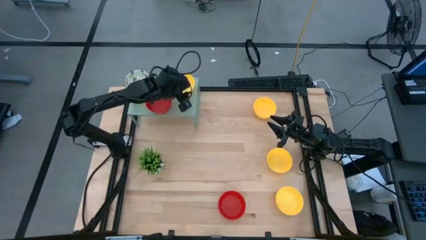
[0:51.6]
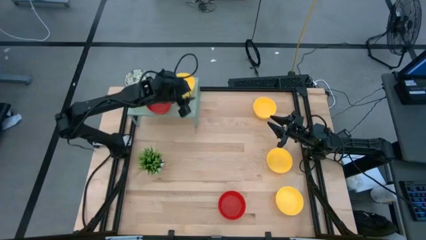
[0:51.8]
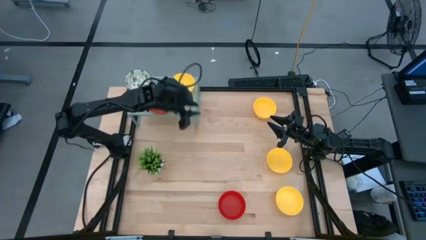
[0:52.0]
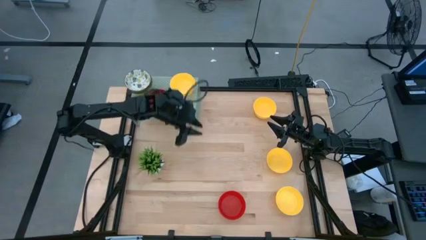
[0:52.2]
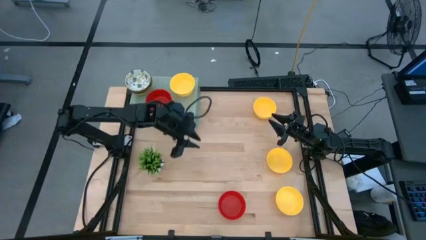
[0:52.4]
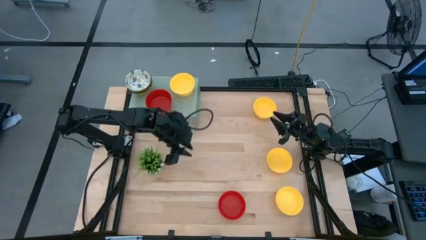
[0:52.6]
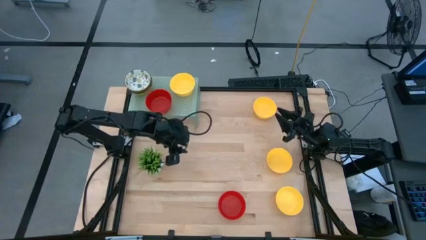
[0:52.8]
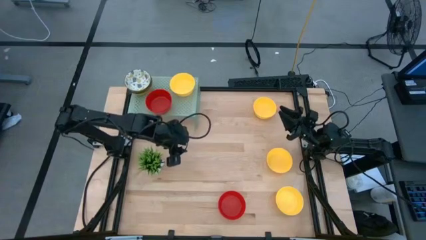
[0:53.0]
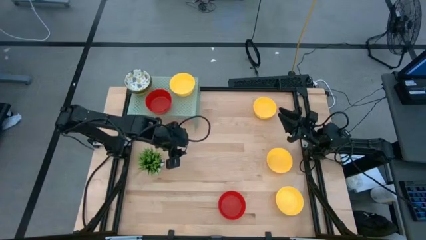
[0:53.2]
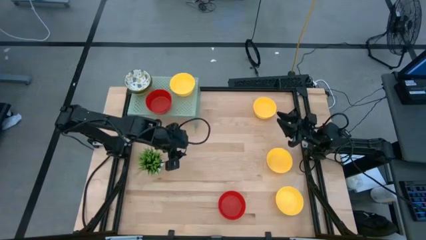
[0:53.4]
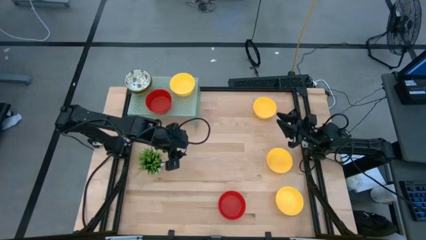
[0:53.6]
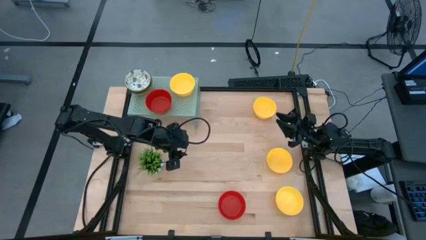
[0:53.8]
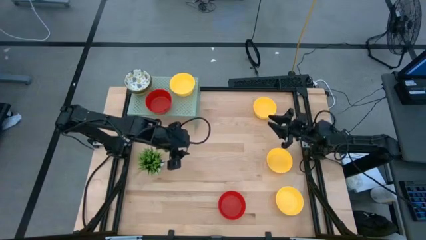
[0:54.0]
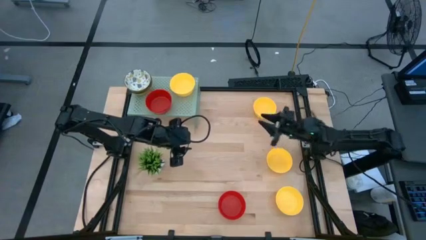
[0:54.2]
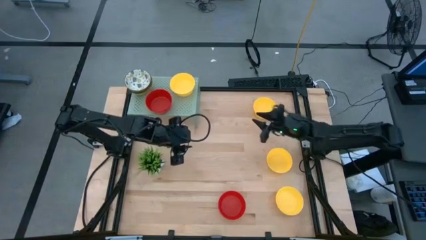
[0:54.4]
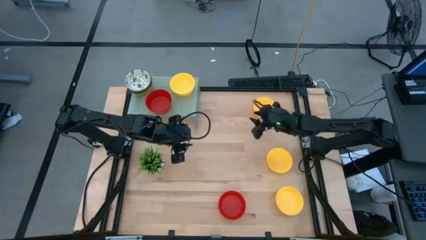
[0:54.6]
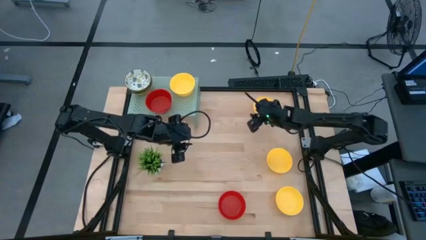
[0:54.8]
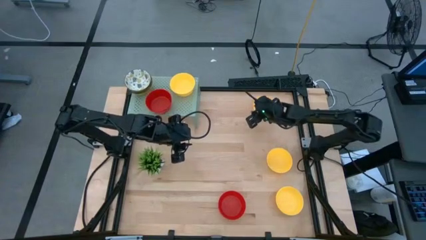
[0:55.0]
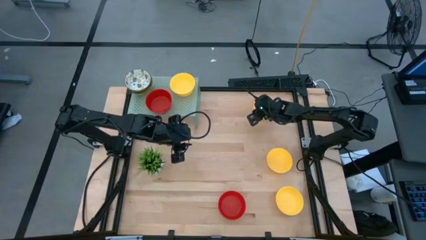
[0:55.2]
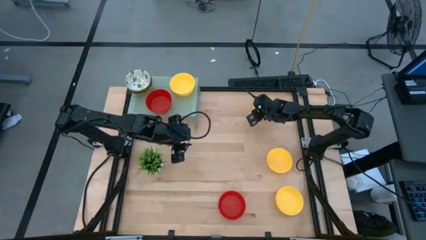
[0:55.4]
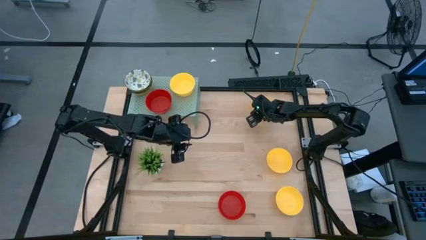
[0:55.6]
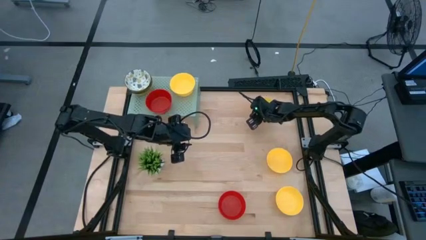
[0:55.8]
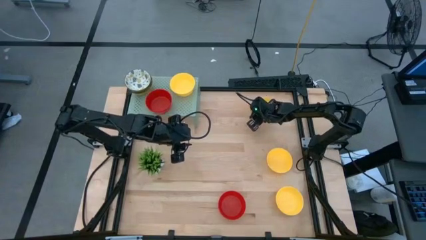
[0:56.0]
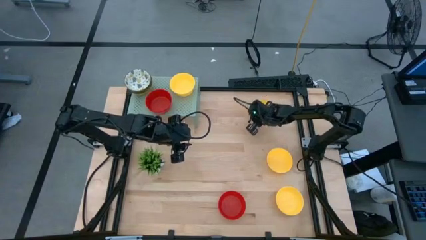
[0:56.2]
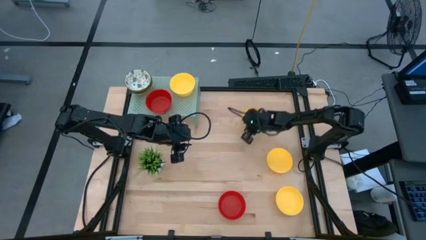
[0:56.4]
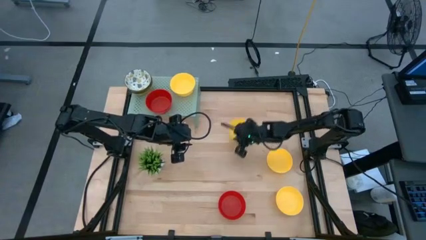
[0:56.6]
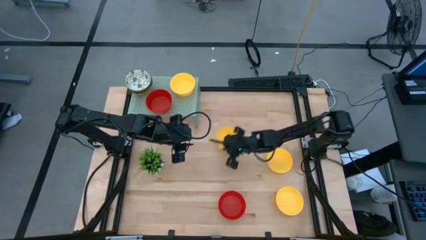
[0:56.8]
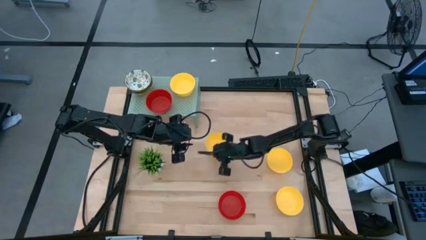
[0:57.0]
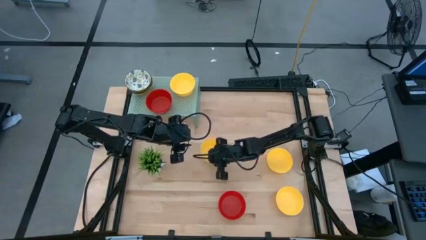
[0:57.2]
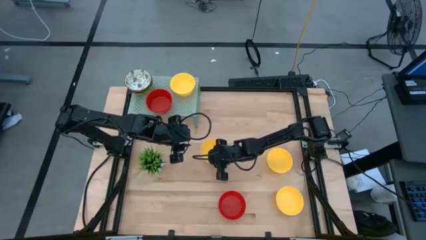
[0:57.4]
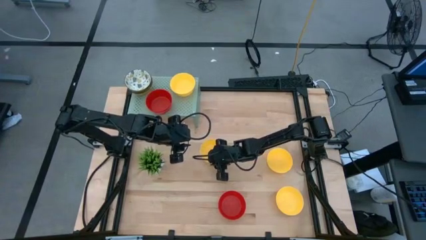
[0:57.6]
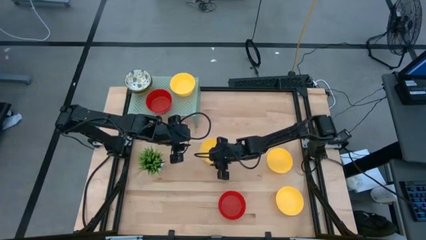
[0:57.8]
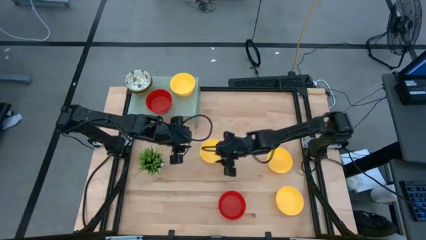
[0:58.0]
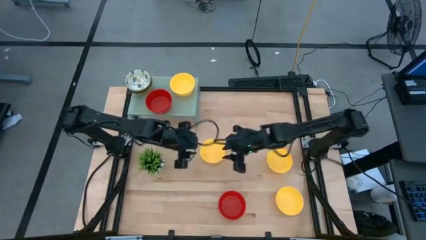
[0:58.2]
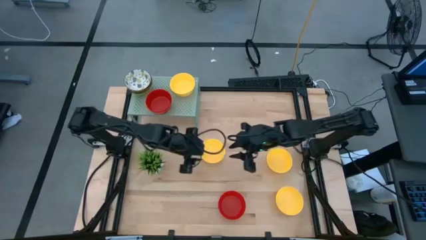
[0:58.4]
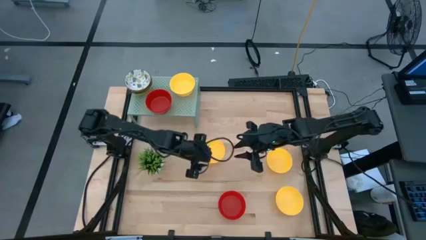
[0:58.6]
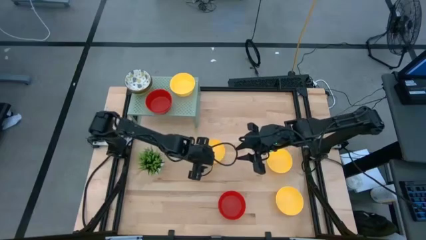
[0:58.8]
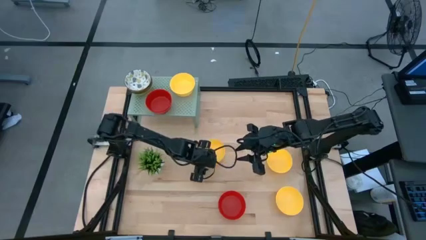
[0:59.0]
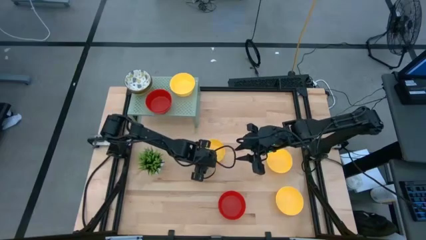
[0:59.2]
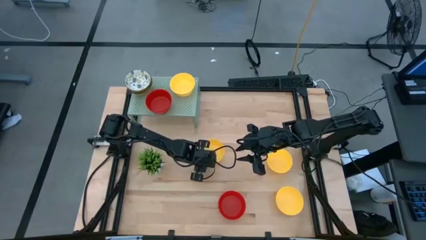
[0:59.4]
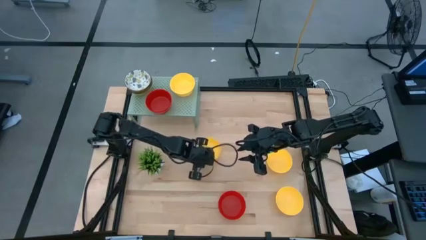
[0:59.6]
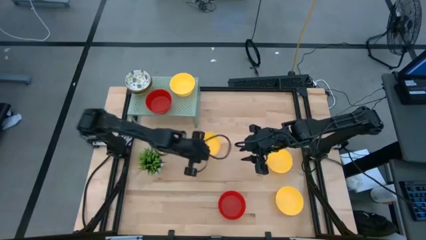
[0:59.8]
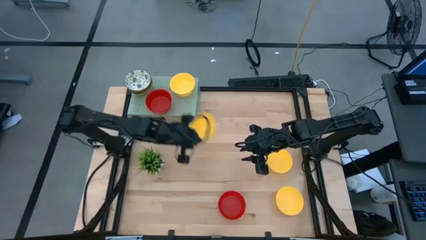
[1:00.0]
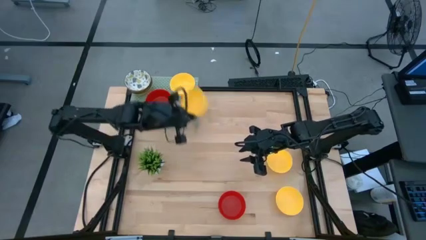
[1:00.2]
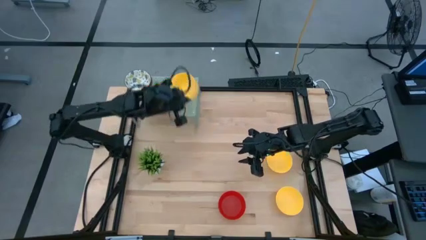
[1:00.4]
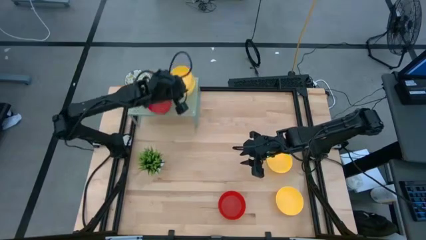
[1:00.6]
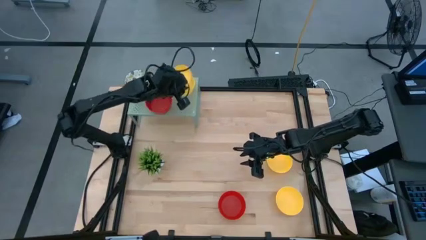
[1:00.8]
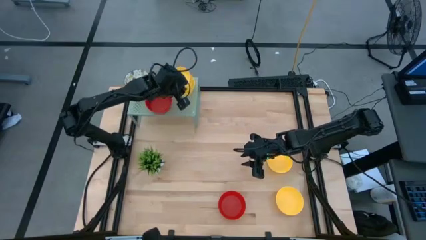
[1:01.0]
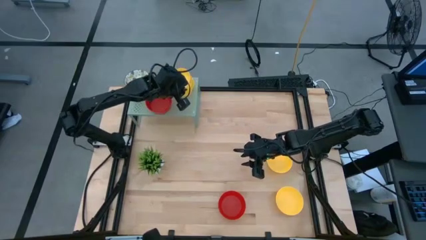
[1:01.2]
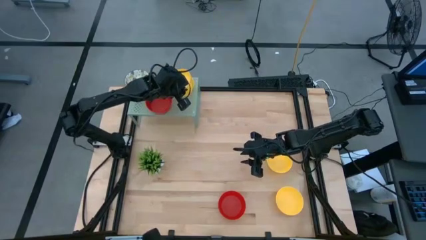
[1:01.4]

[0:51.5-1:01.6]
Task: Pick & Place Mini bowls
Stack the yellow bowl on the yellow bowl on the shelf

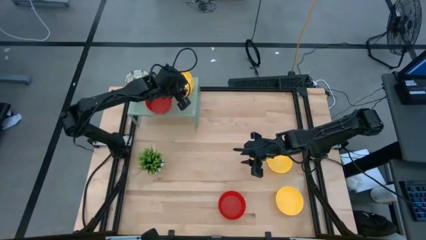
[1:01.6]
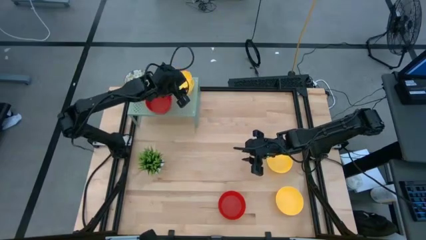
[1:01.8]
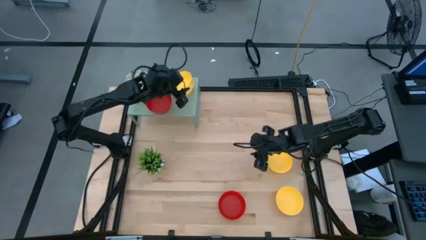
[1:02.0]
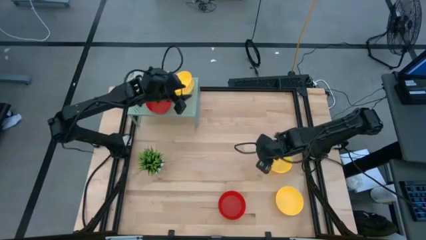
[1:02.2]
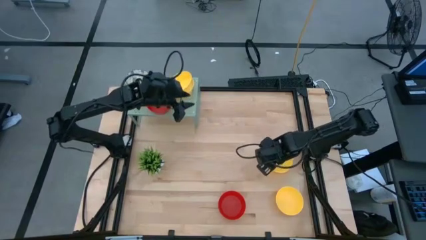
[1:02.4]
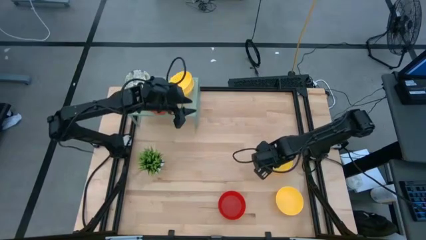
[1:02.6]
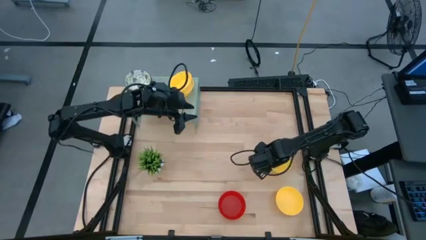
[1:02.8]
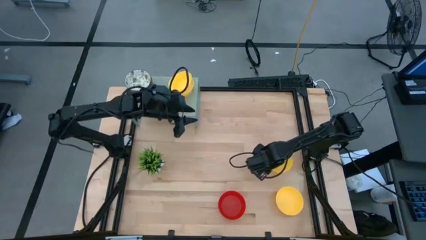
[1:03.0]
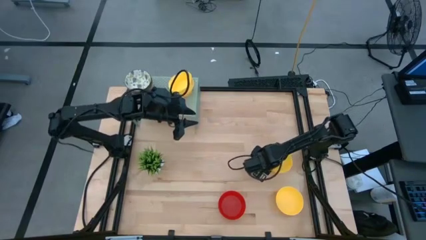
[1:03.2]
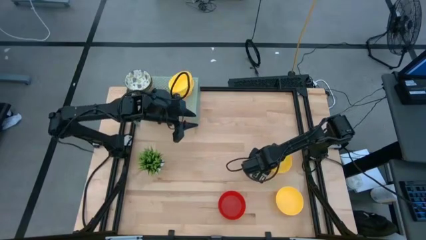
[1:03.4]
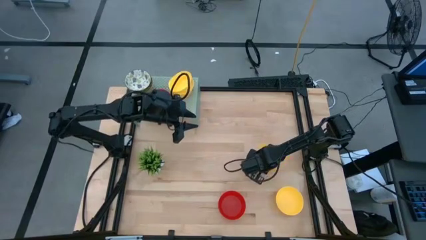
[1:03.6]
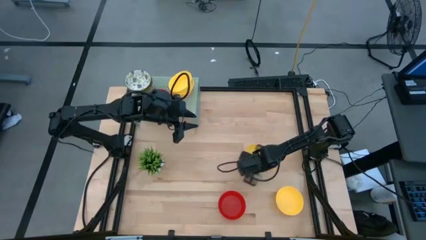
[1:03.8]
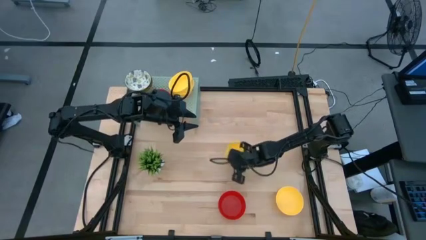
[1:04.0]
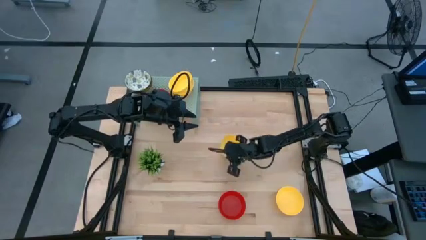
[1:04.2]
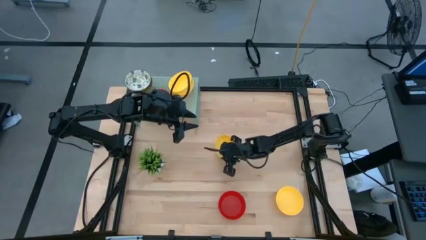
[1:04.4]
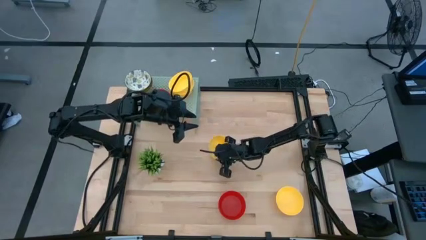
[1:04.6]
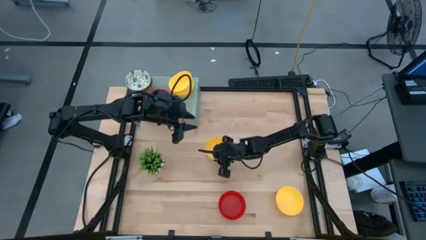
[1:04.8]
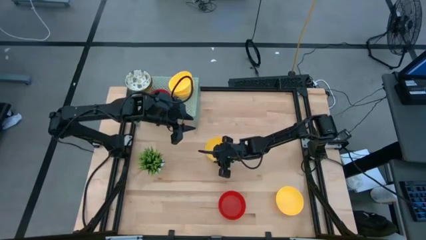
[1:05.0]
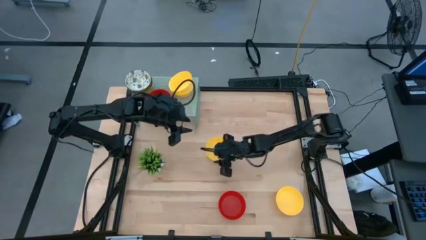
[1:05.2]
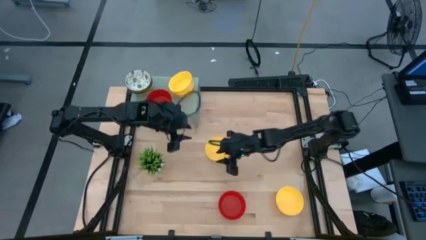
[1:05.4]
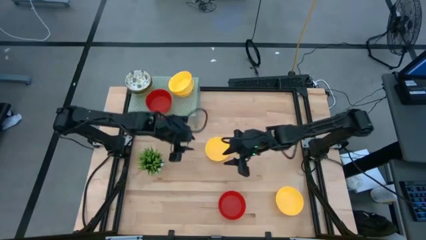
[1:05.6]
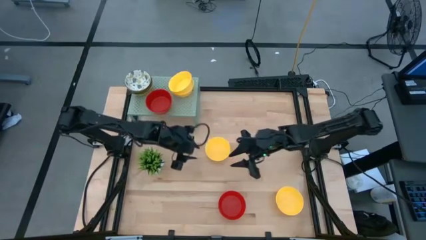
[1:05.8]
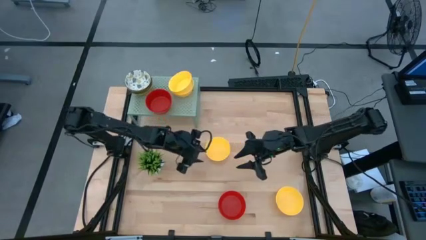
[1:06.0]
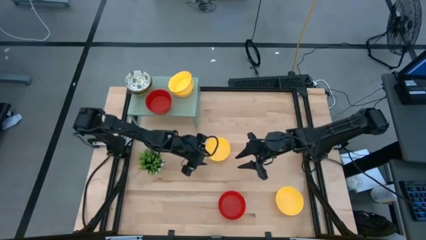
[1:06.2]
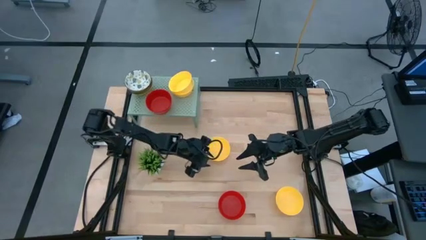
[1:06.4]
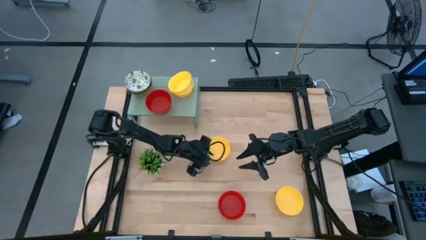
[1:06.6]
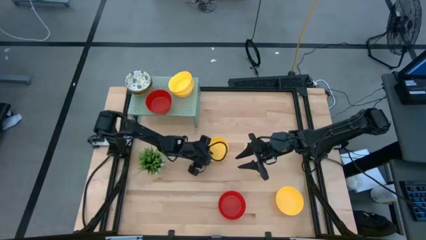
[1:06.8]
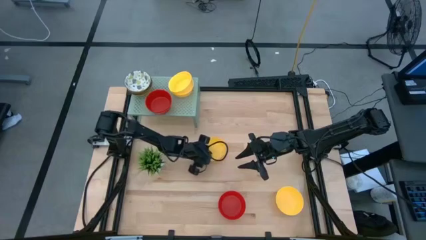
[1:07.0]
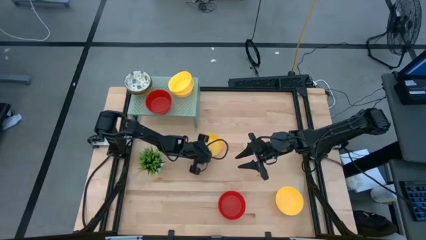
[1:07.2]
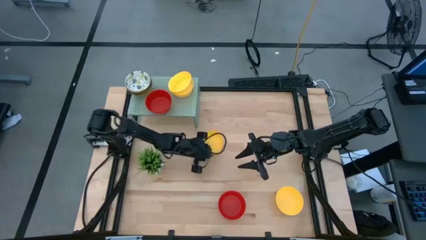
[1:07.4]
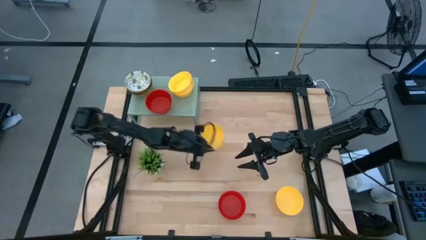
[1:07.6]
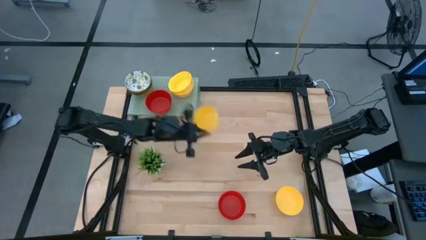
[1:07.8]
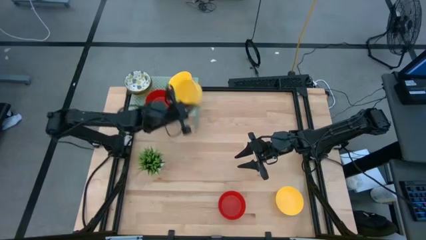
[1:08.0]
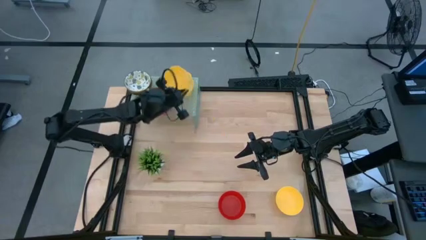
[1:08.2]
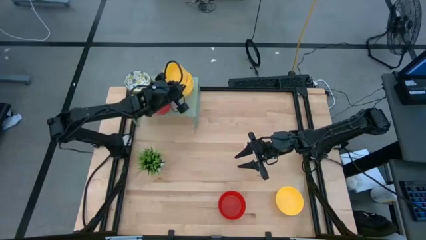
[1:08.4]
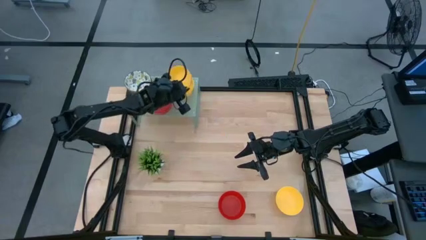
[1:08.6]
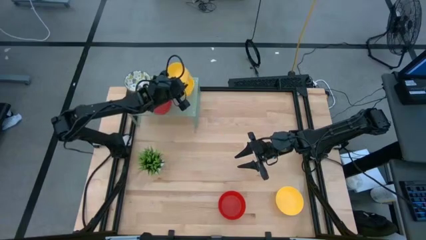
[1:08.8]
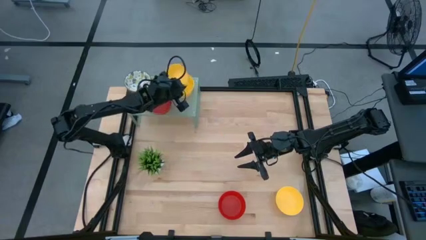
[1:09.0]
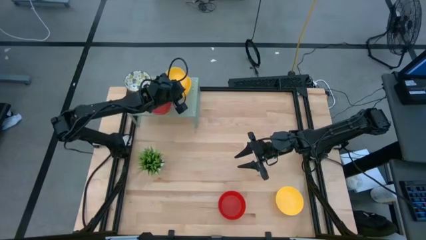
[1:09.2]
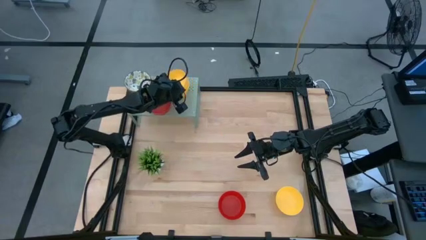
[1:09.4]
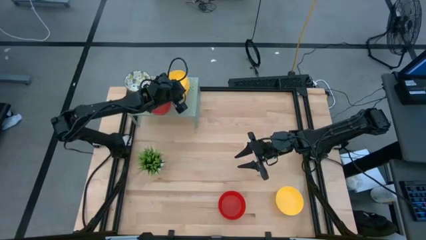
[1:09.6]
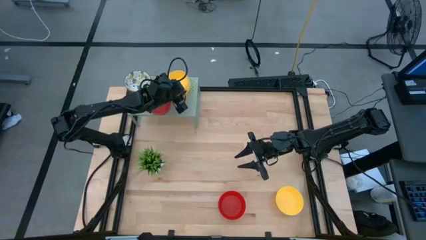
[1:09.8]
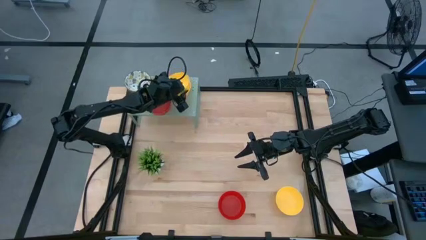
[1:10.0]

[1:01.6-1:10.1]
Stack the yellow bowl on the yellow bowls on the shelf
